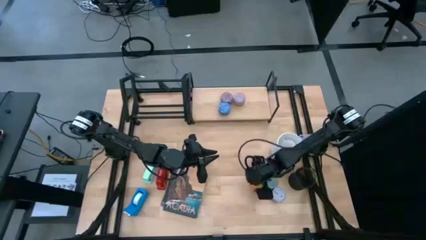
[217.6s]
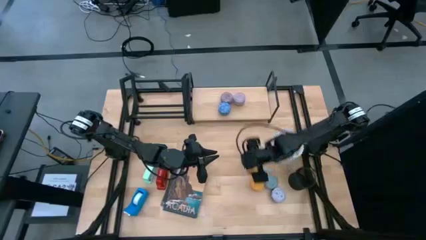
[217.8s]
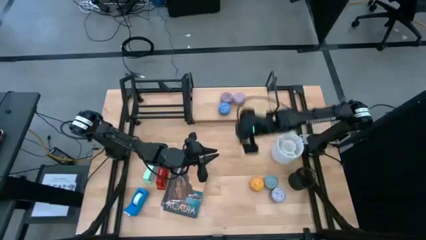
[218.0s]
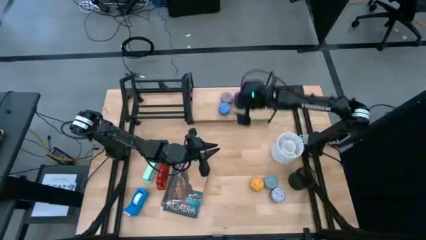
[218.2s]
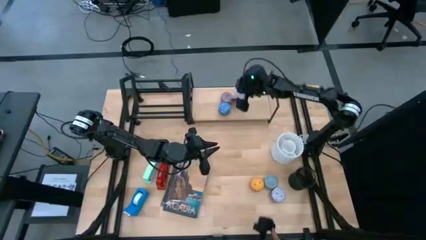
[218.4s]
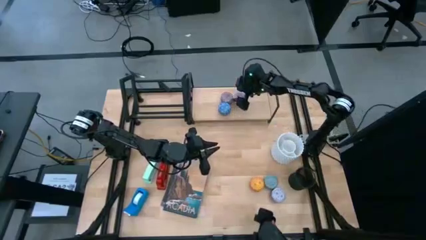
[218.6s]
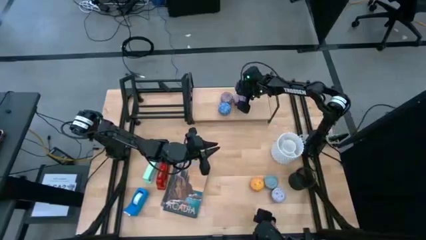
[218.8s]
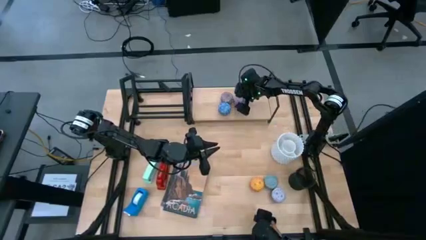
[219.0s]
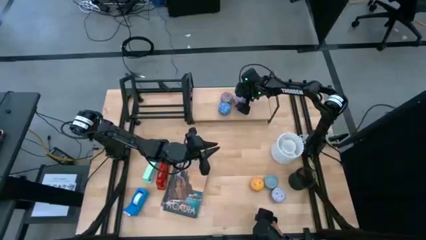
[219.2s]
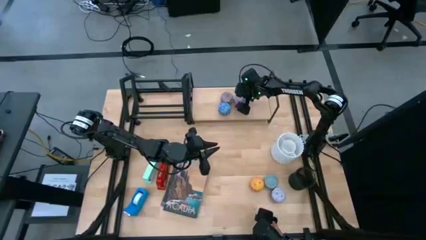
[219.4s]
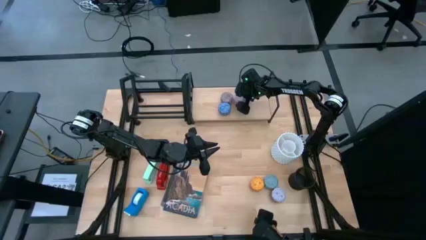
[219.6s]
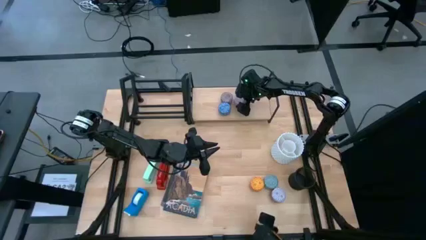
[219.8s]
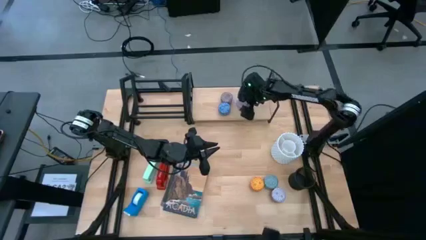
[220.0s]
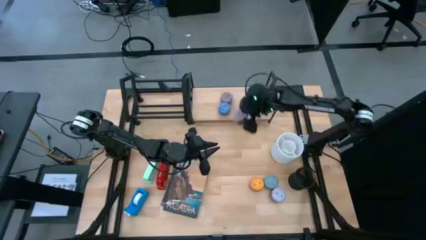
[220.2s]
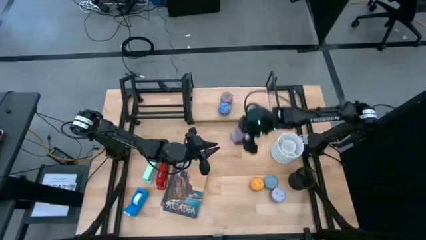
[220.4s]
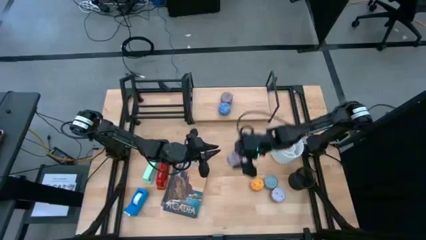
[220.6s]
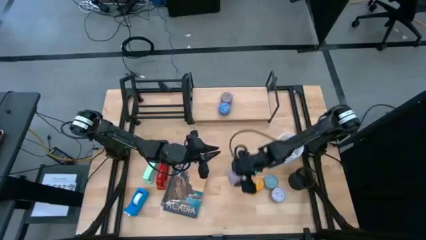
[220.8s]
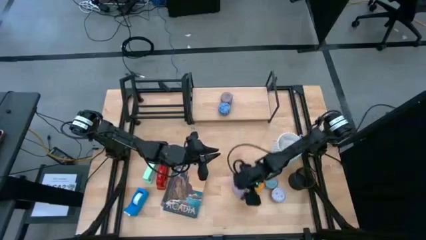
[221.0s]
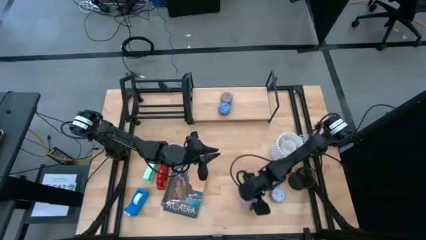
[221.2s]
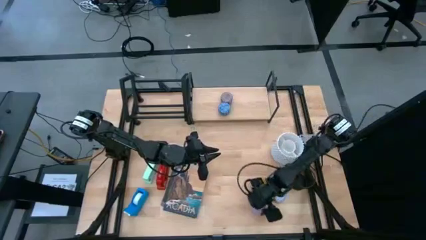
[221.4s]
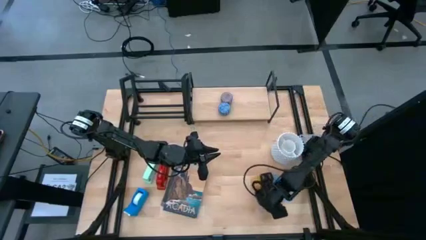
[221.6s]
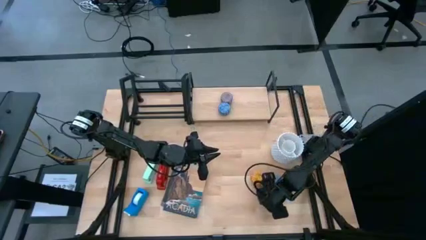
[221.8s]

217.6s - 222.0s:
Task: Stock shelves
Remove the pink scented candle from the shelf

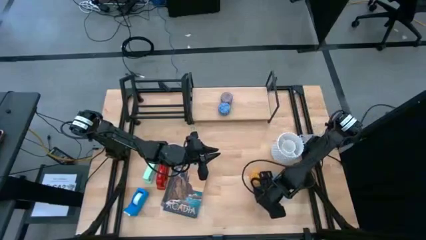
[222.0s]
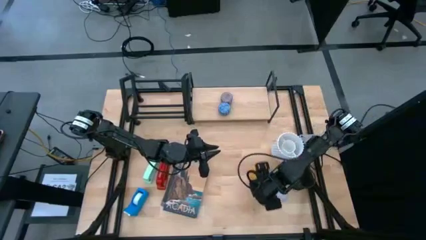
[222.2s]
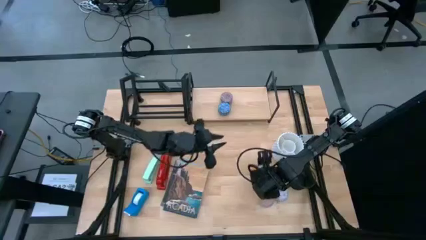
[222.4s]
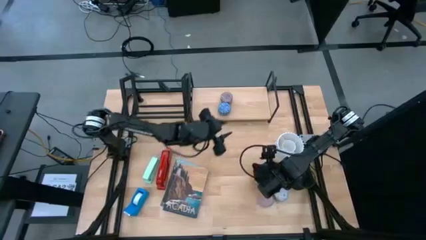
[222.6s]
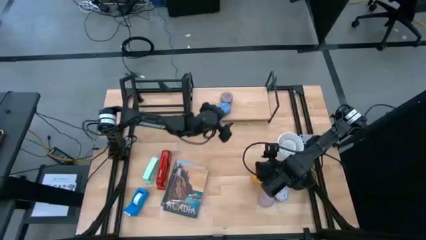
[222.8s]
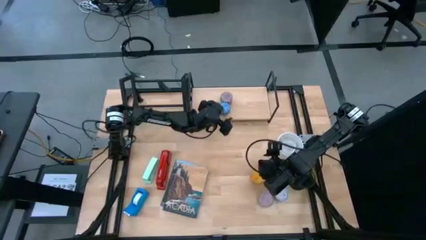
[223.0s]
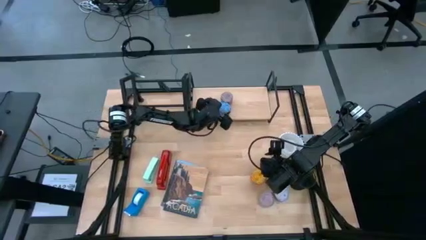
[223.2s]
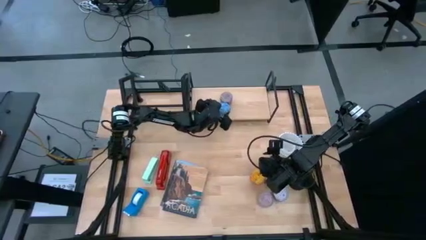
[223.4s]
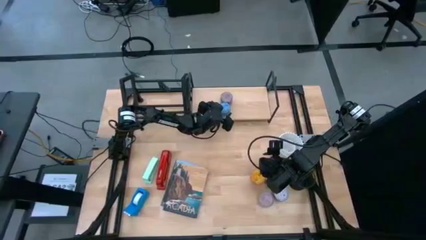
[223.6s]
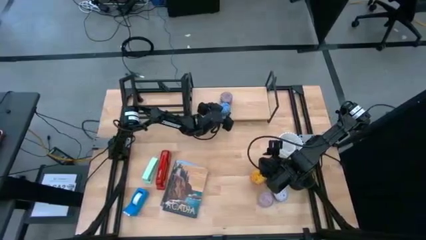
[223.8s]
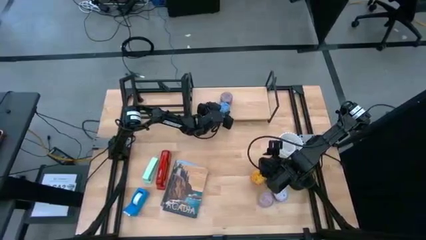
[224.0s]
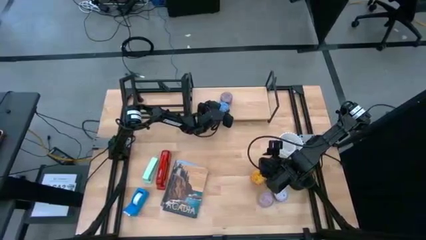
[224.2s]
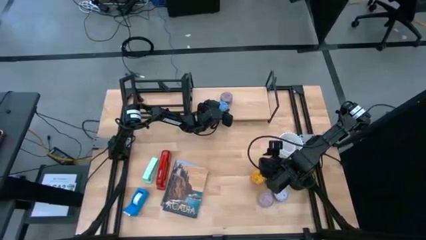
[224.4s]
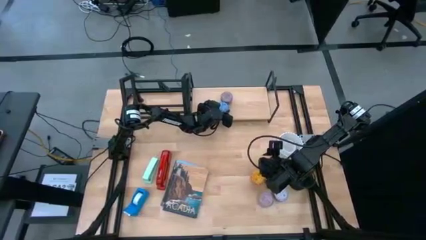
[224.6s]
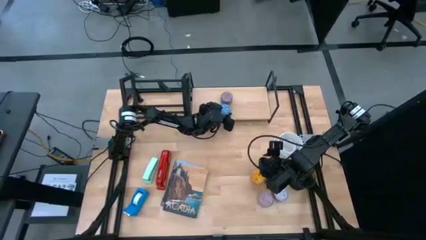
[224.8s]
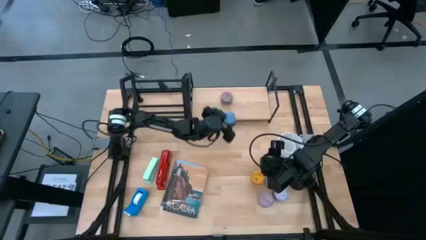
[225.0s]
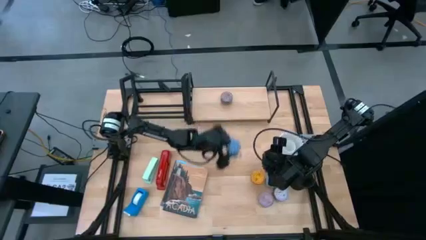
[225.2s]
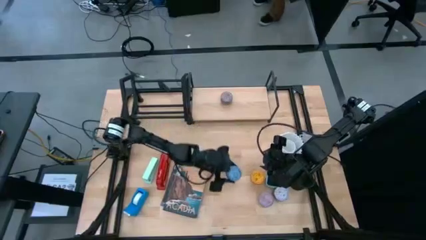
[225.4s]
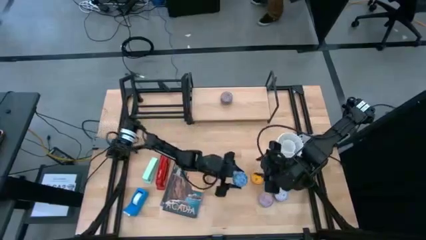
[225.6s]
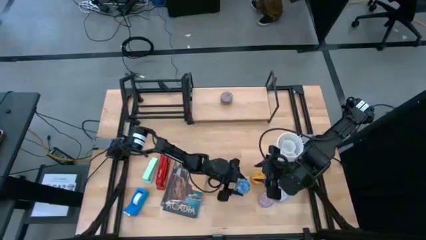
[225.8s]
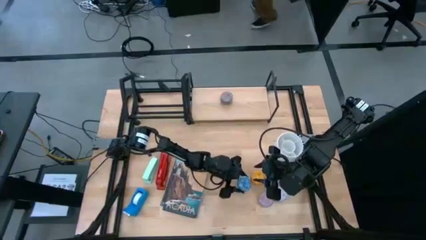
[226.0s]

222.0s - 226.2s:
Remove the blue scented candle from the shelf

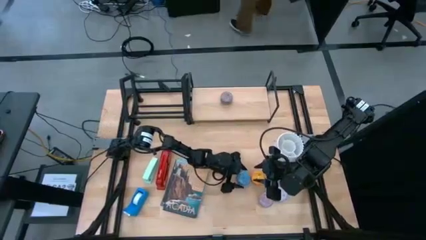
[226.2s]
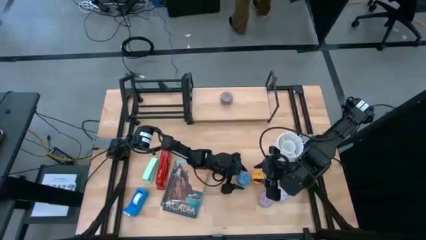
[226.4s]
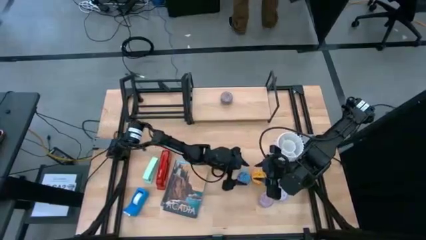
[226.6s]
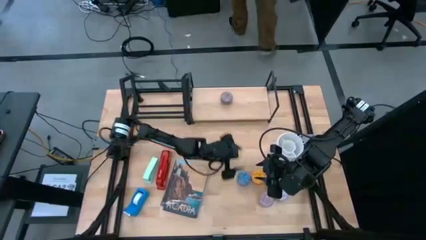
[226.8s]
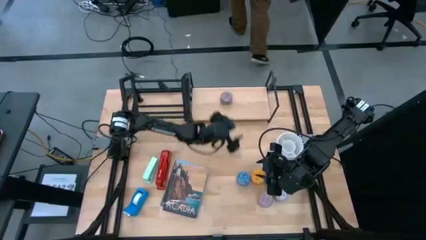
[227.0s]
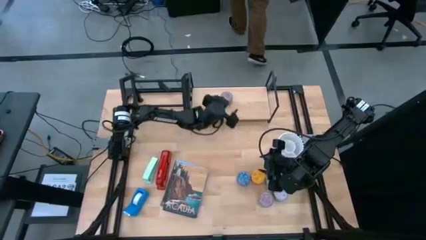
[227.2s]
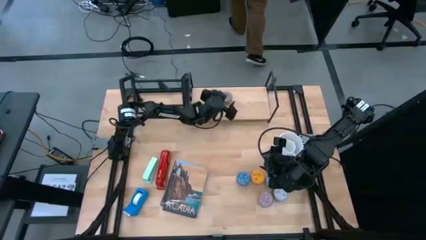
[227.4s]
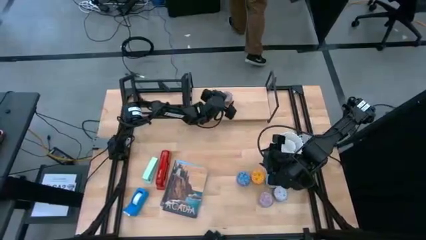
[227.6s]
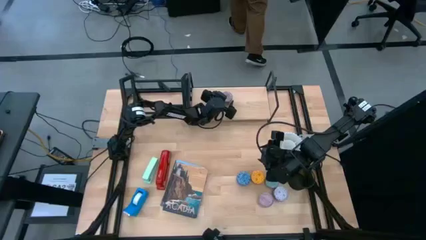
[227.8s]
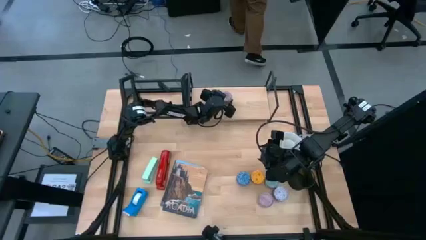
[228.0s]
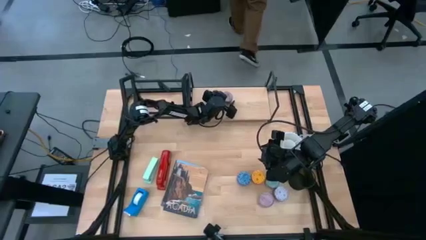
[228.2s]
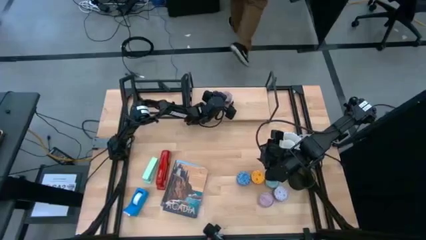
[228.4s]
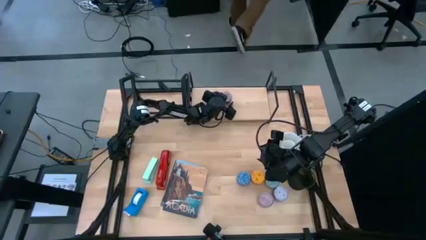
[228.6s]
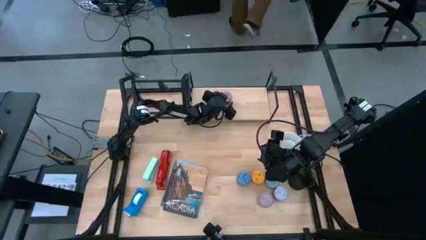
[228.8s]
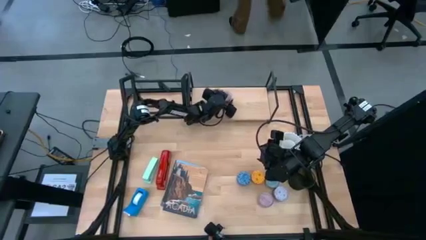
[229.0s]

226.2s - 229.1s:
Remove the red scented candle from the shelf

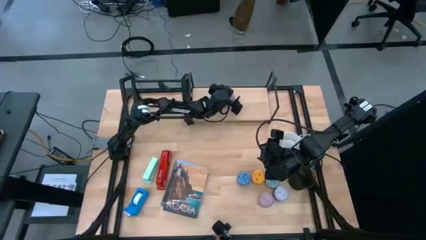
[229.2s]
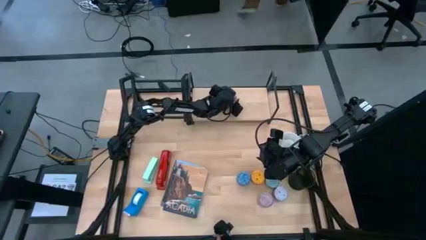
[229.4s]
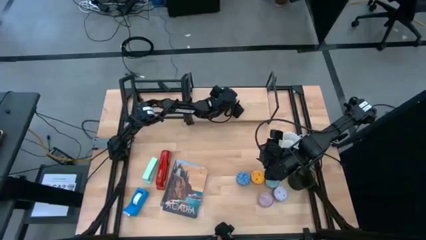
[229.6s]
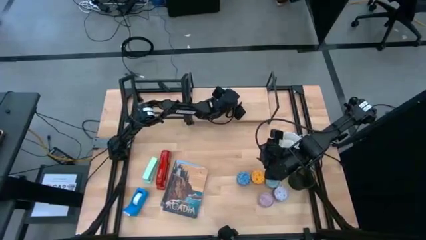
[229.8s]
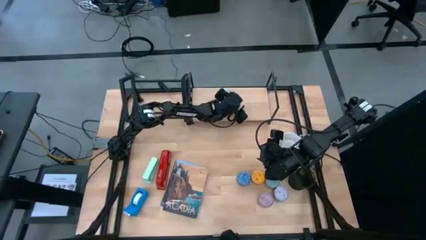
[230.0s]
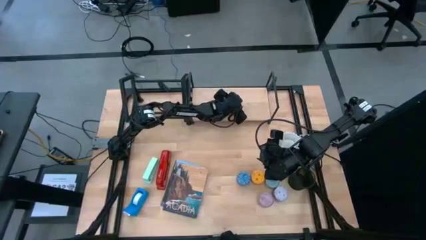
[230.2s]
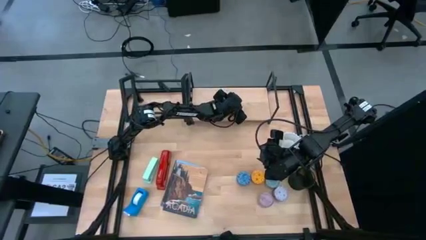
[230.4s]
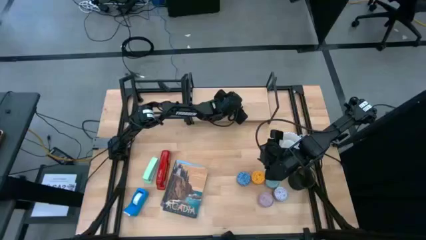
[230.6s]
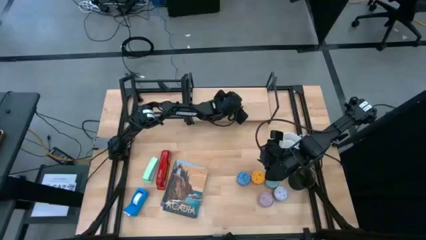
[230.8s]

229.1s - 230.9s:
Remove the red scented candle from the shelf

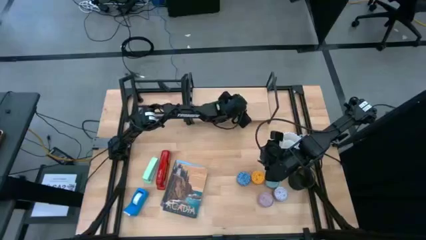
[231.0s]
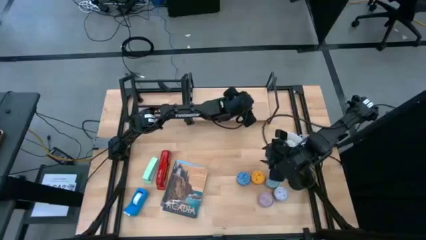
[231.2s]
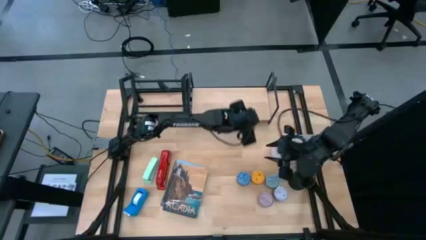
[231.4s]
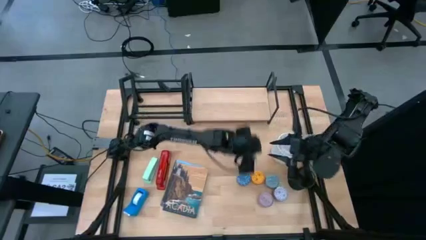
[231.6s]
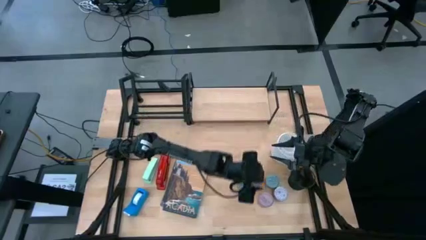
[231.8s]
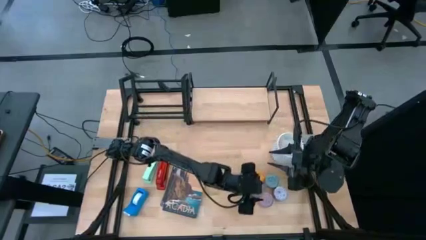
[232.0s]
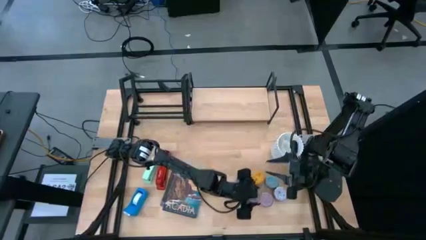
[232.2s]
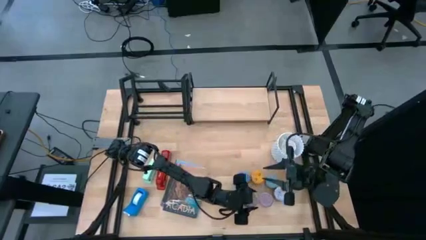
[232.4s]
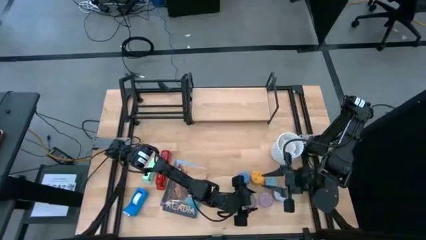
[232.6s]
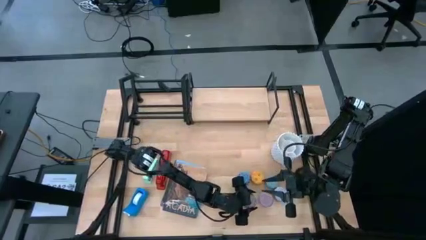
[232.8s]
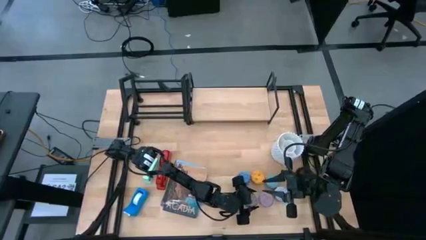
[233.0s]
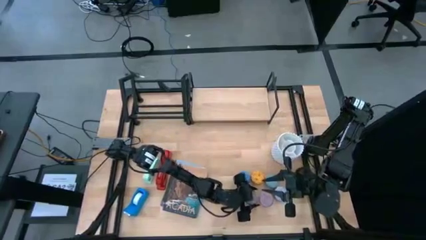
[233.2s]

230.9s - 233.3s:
Remove the red scented candle from the shelf
